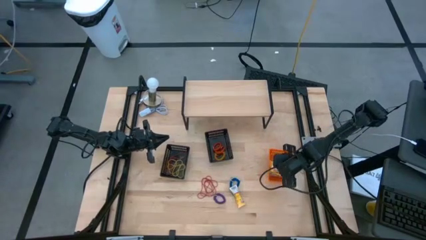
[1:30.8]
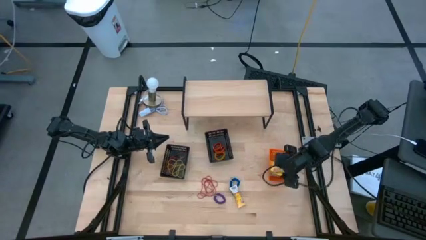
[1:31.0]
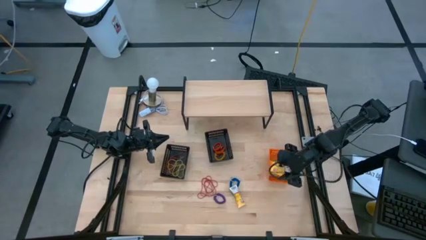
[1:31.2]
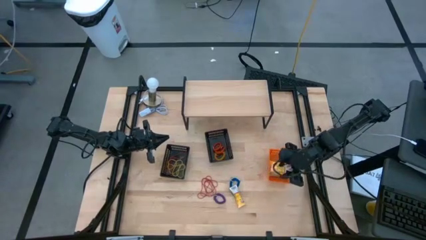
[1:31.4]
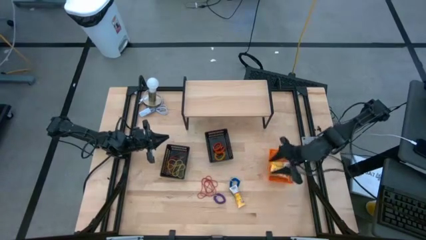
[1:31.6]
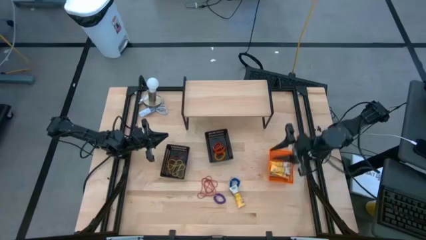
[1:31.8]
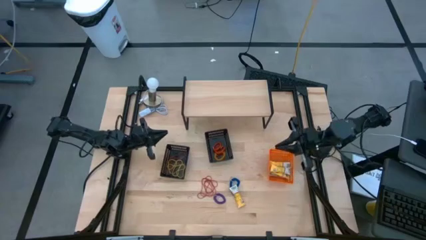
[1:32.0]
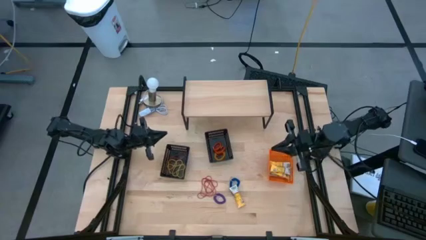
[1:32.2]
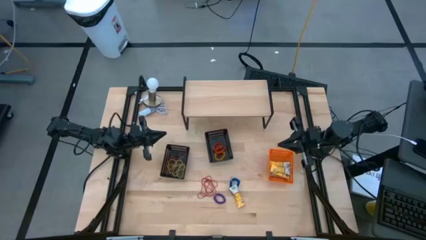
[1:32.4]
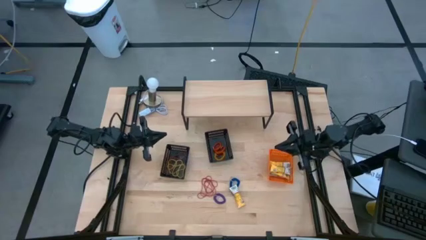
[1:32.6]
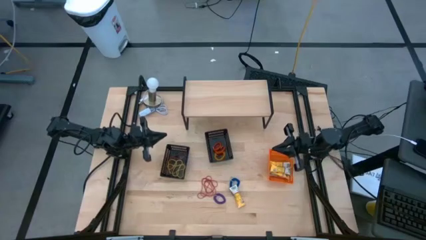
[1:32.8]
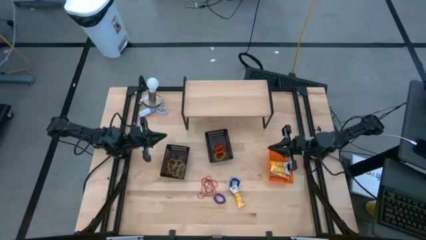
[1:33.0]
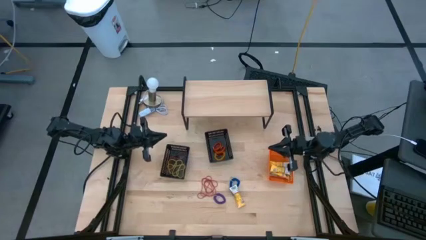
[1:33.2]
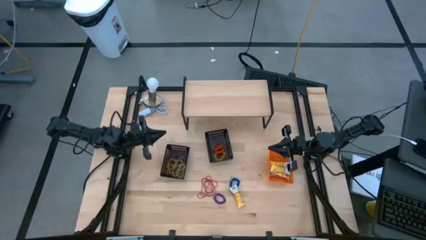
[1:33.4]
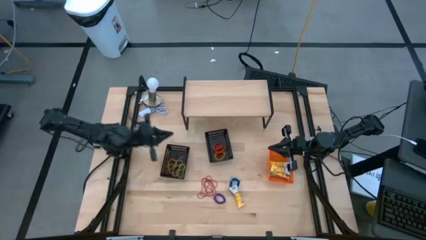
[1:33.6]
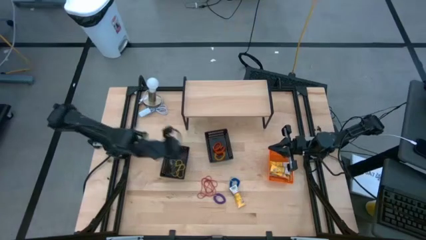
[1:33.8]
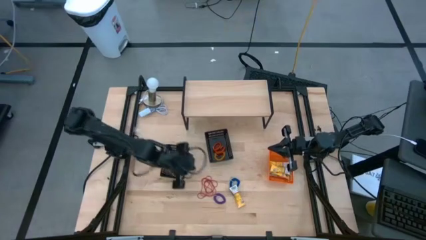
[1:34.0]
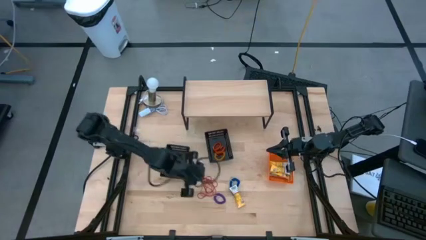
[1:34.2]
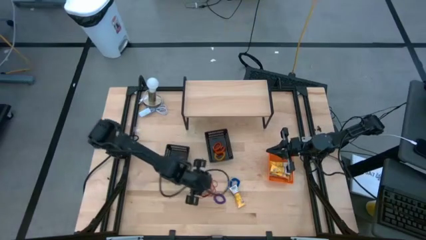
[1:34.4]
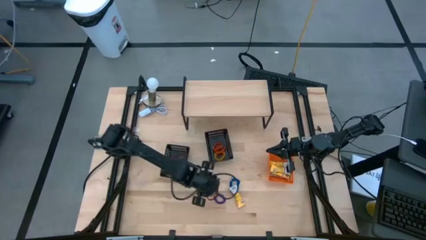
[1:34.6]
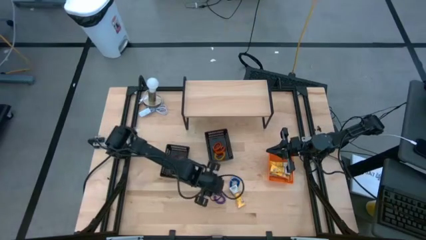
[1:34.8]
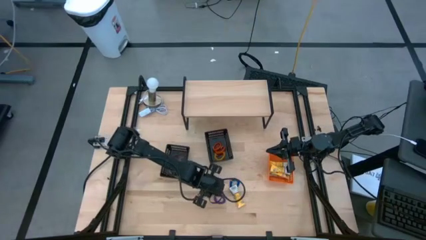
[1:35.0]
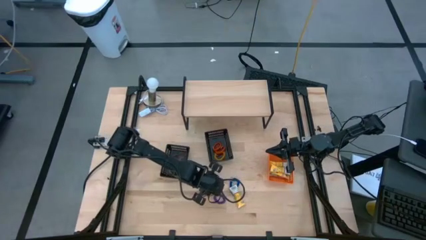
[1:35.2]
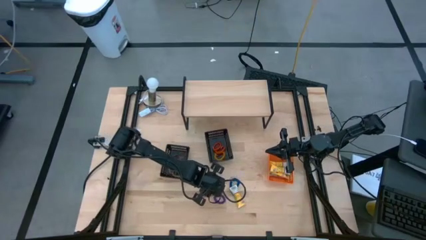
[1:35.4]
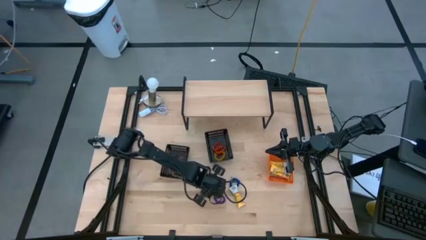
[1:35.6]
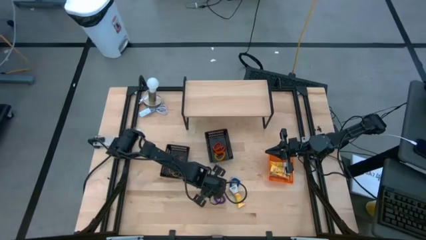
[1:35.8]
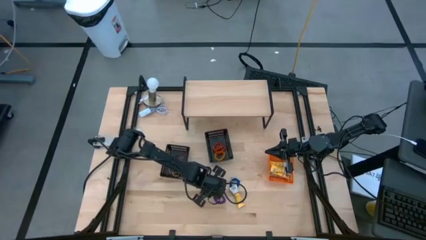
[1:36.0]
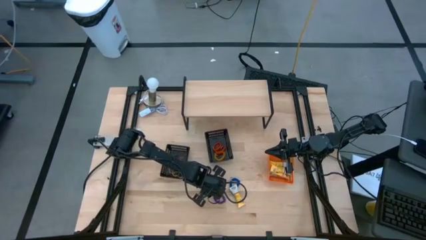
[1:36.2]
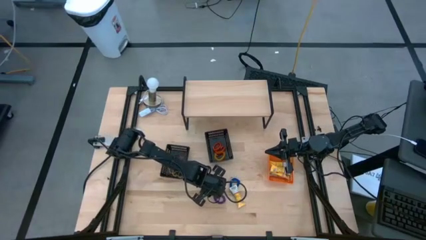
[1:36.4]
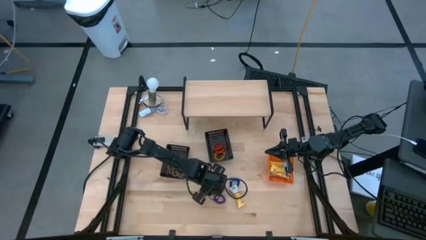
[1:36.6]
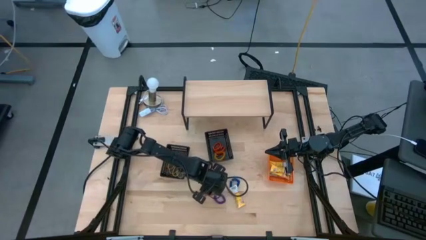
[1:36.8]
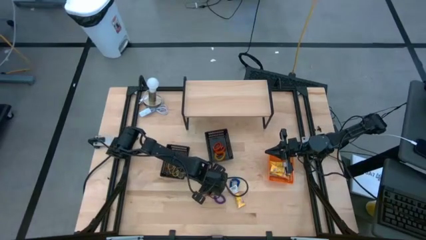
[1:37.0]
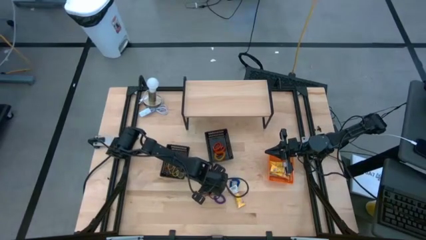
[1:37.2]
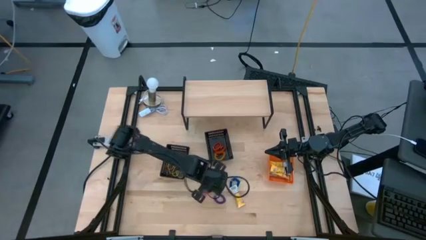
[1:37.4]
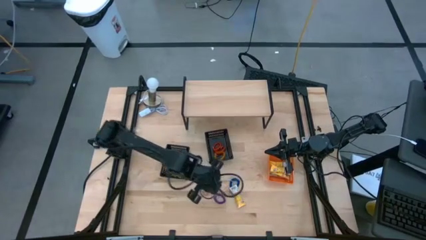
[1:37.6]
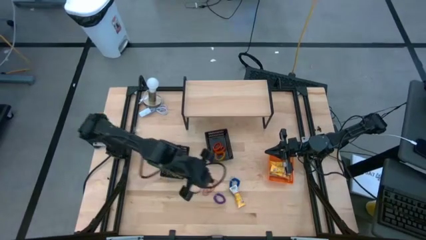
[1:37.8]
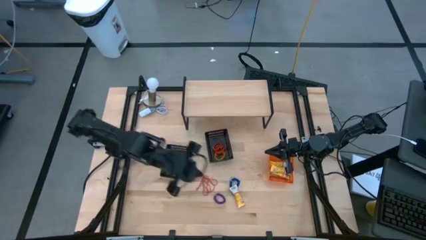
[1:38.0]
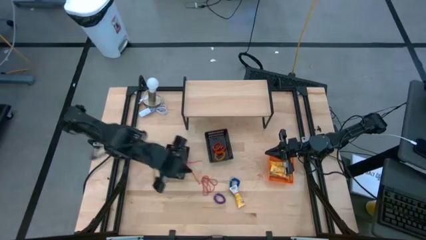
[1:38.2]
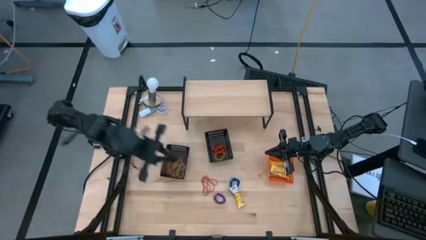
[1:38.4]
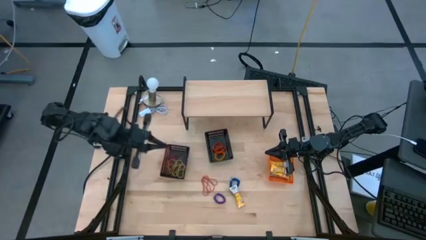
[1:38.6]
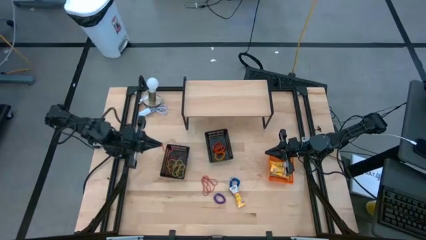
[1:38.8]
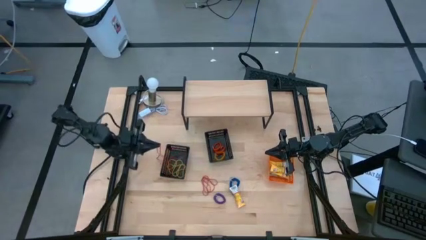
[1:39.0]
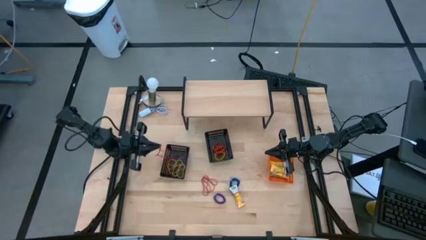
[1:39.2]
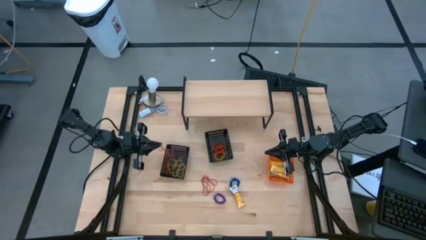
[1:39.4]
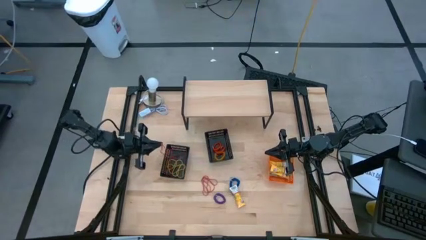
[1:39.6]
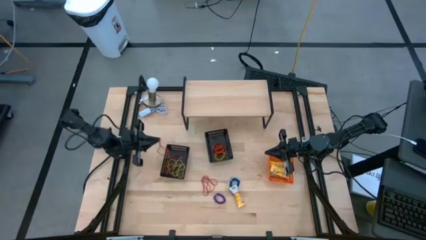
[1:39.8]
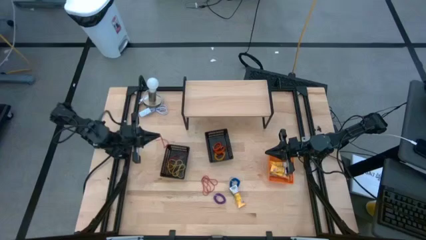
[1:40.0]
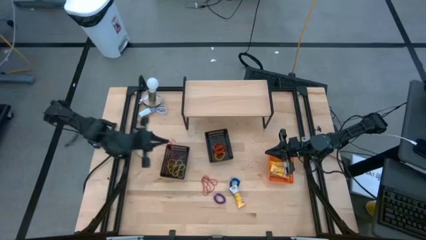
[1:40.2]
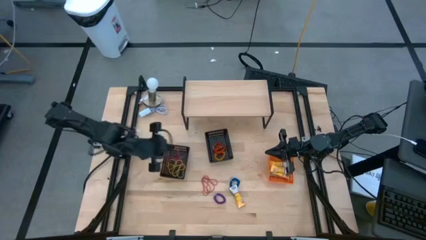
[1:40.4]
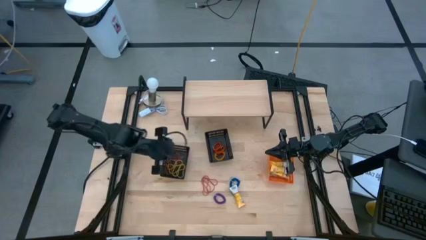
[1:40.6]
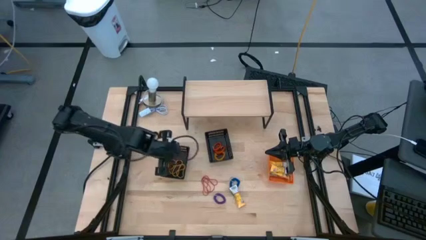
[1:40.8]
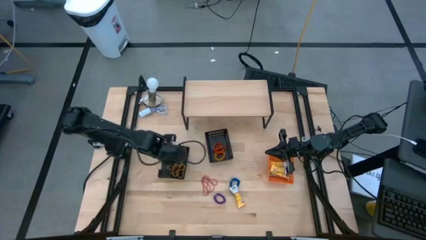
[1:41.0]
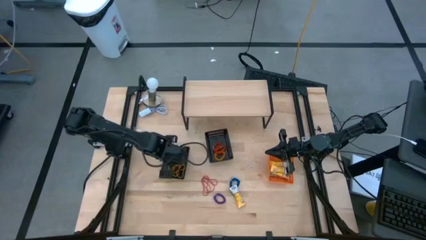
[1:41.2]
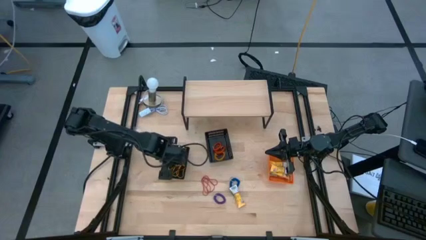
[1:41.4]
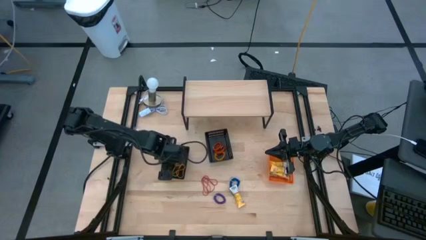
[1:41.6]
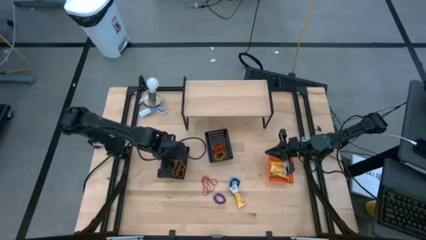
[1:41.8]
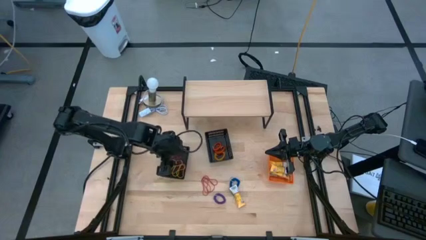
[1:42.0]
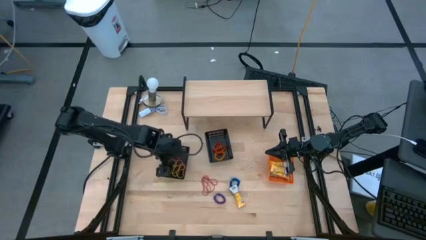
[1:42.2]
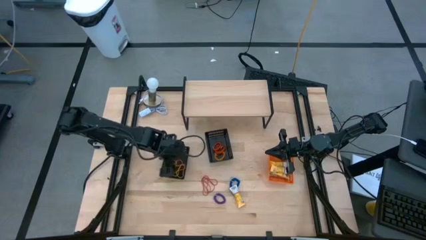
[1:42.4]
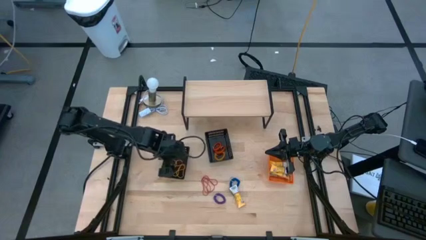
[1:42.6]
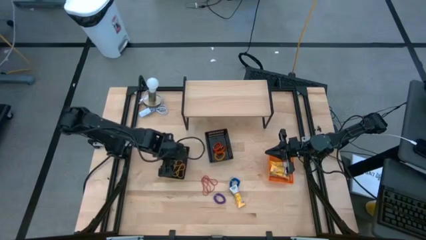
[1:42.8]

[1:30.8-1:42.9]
Task: Pick & Place Office Desk Supplies
Put the red rubber band into the left black bin

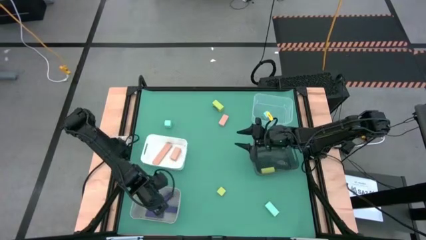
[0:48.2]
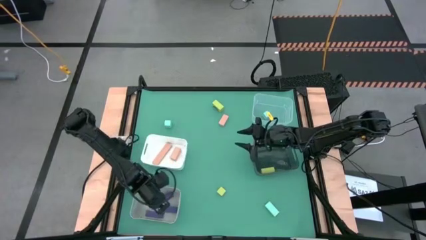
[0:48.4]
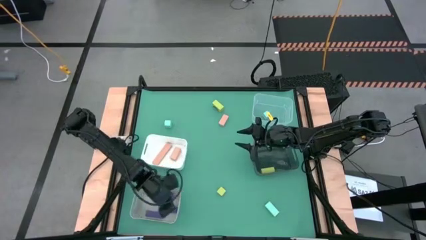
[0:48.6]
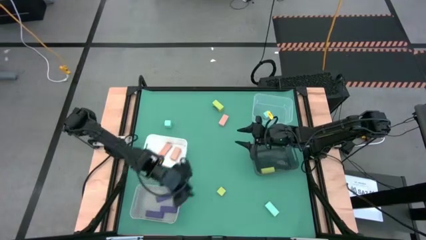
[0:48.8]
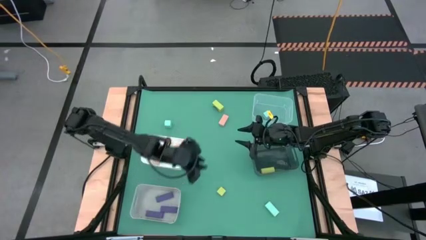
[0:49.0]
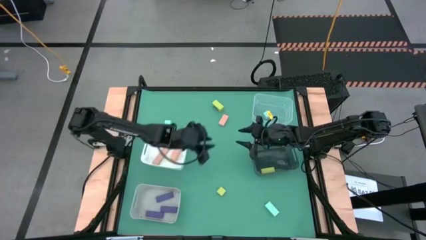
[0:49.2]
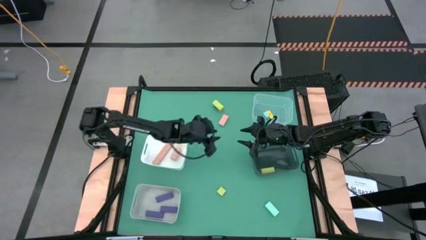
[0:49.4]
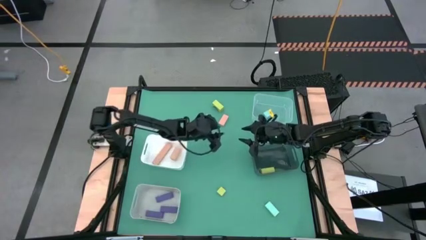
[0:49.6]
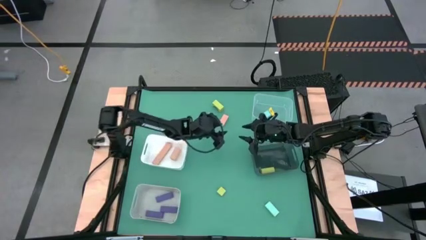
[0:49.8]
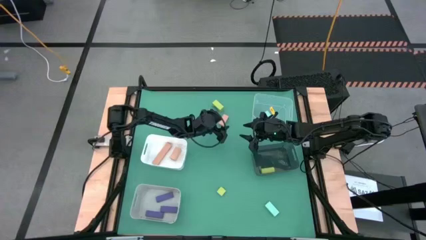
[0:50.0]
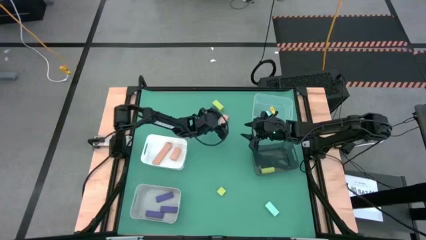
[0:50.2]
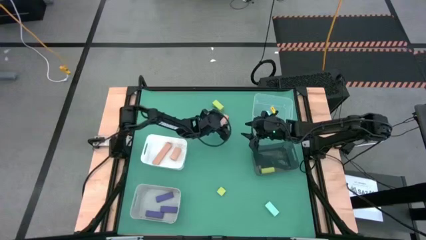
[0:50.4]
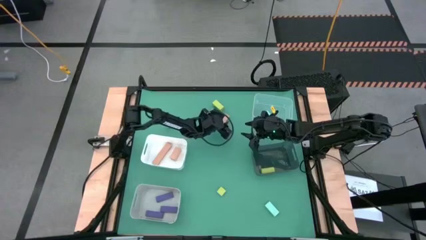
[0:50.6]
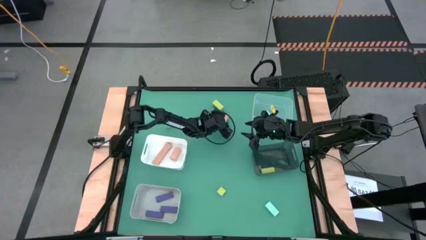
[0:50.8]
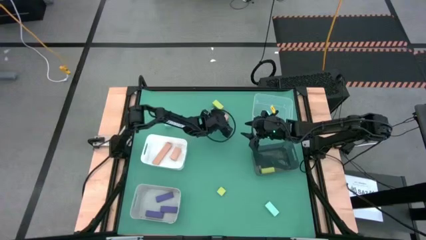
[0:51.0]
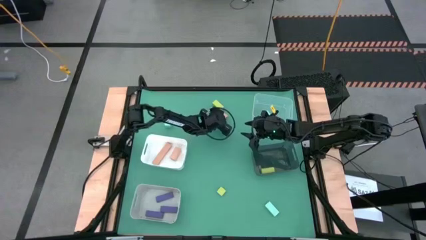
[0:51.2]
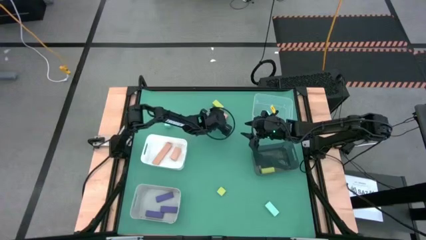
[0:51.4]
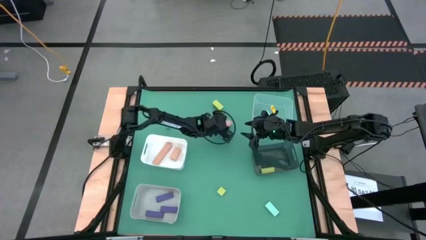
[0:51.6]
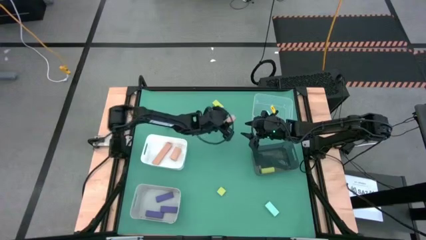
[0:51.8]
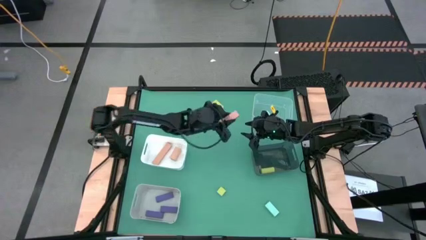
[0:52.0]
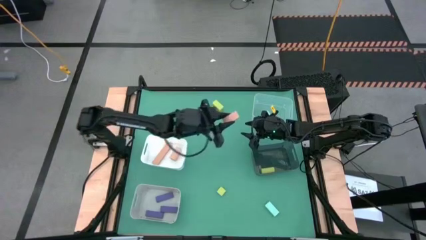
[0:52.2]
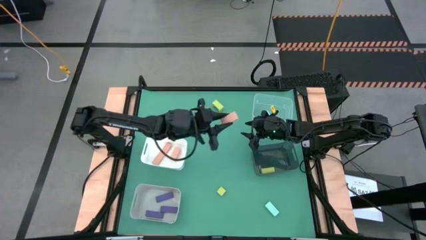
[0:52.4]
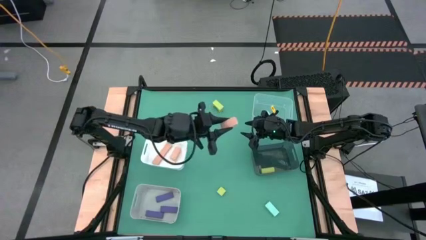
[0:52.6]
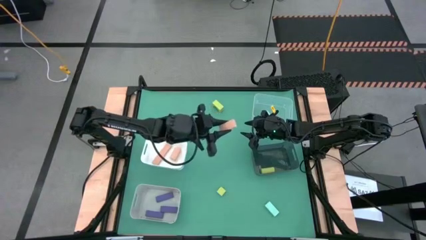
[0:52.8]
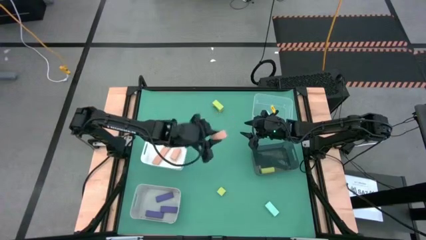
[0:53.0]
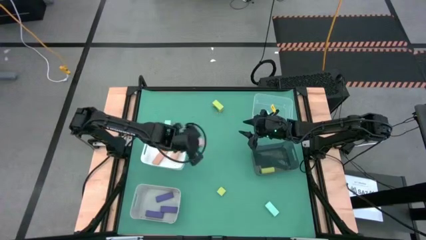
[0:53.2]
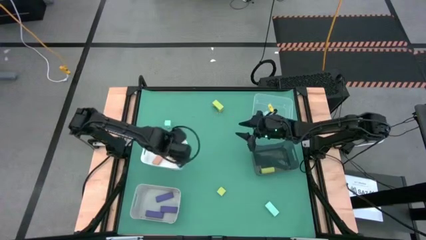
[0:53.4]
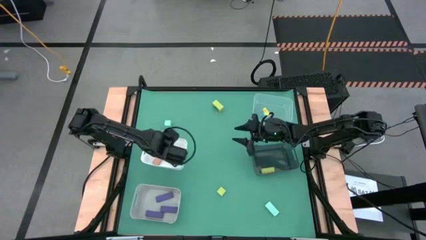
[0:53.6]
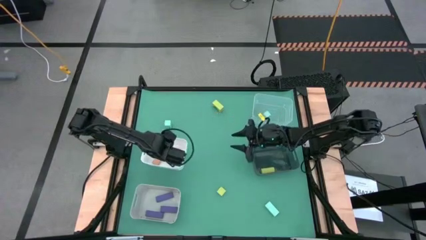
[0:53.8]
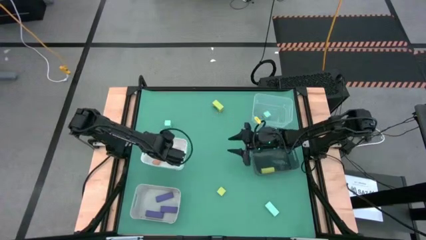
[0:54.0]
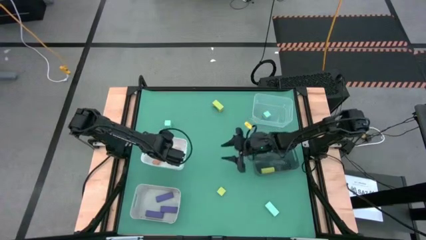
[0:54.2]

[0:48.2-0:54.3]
Task: Sort & place blocks by color
Put the brown block into the white bin
